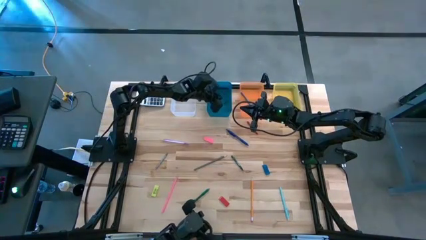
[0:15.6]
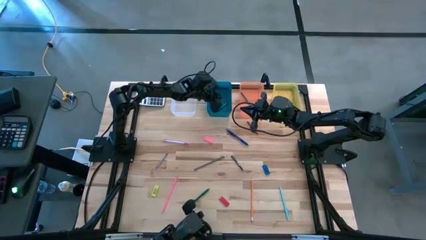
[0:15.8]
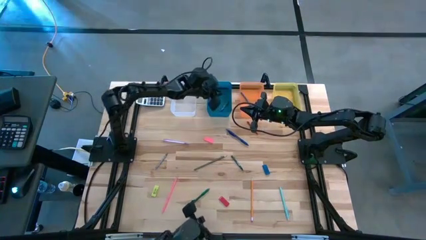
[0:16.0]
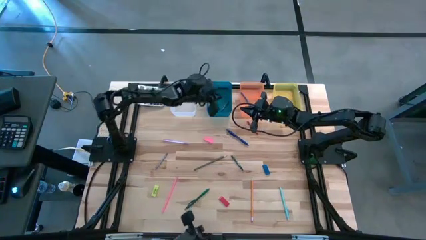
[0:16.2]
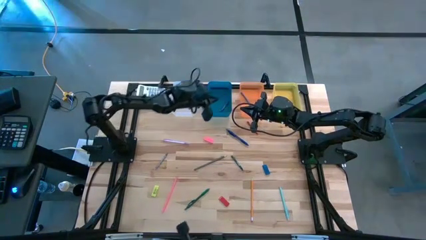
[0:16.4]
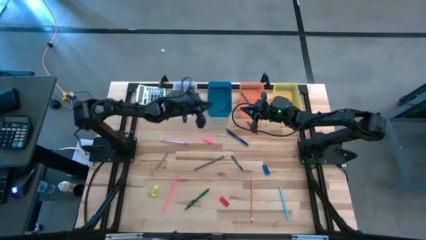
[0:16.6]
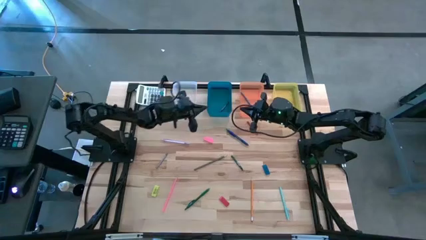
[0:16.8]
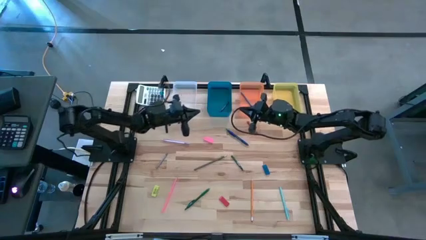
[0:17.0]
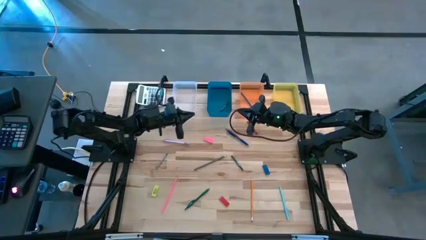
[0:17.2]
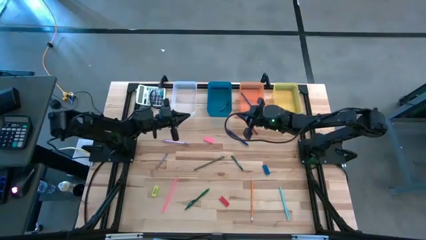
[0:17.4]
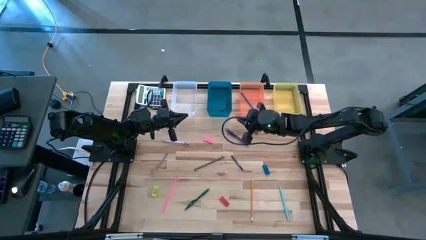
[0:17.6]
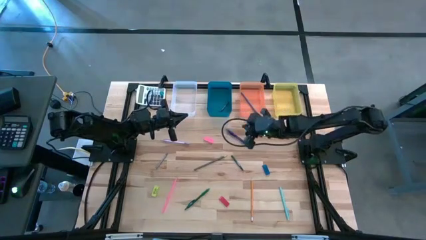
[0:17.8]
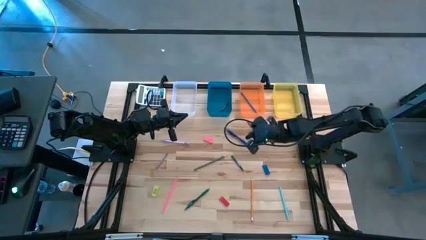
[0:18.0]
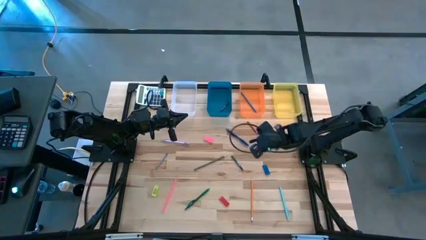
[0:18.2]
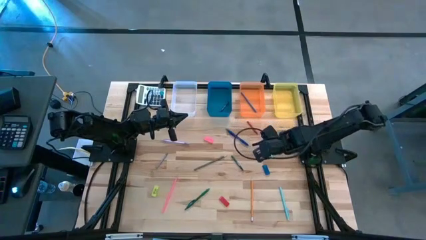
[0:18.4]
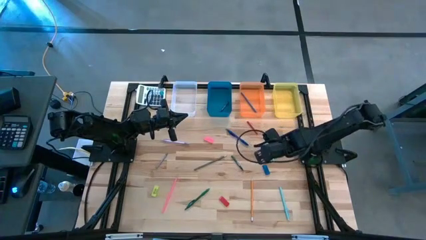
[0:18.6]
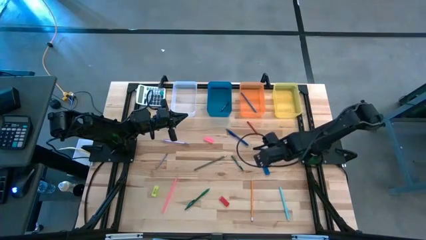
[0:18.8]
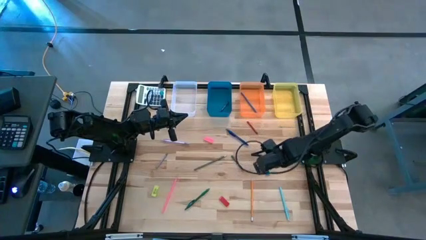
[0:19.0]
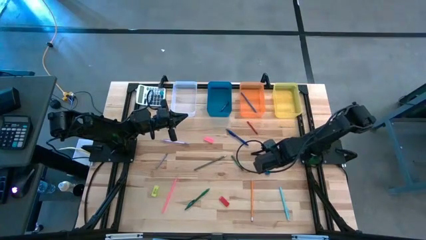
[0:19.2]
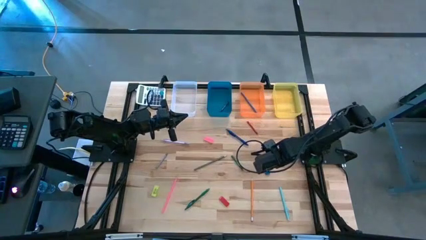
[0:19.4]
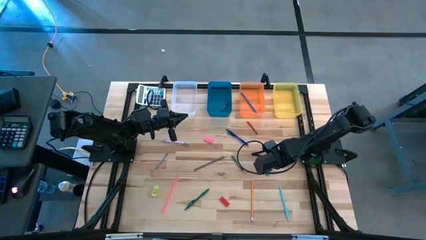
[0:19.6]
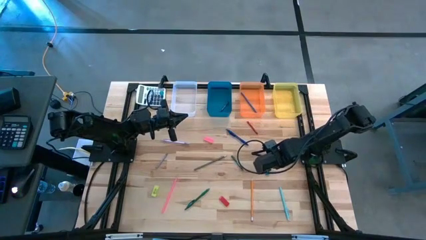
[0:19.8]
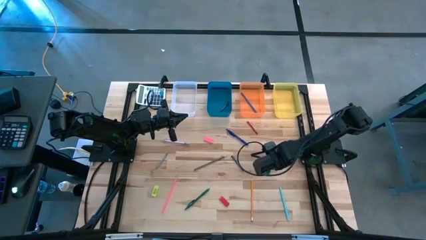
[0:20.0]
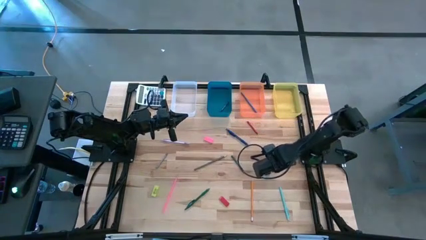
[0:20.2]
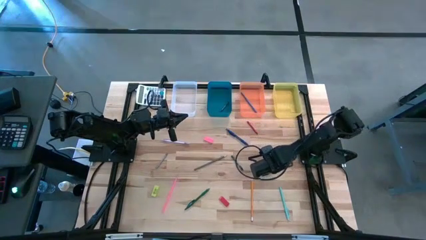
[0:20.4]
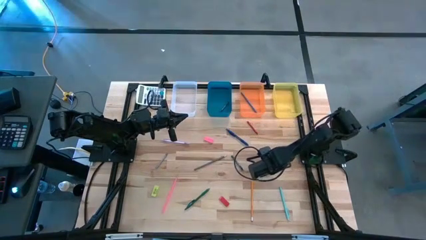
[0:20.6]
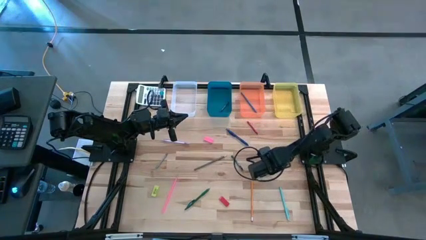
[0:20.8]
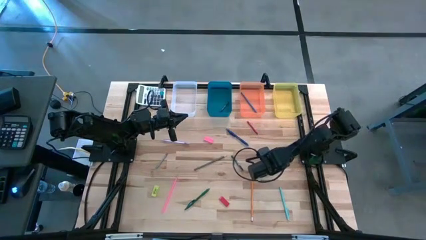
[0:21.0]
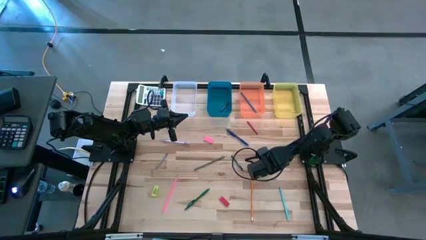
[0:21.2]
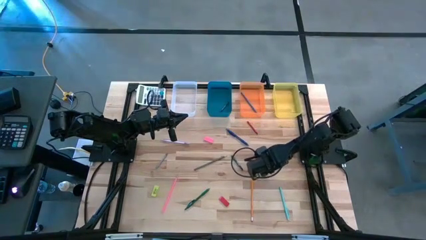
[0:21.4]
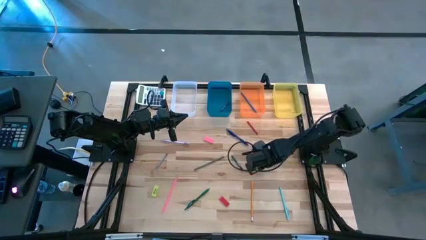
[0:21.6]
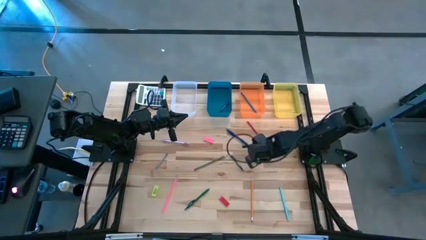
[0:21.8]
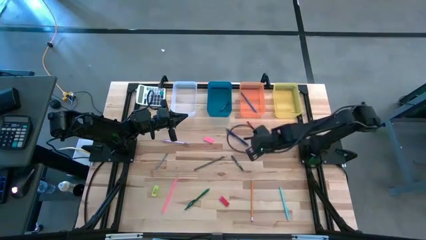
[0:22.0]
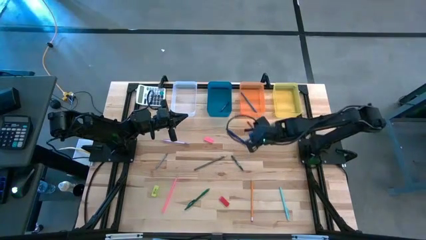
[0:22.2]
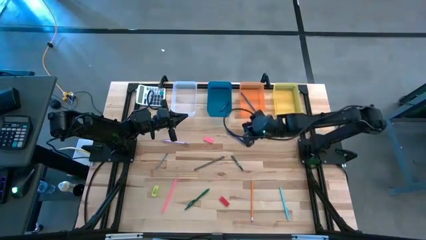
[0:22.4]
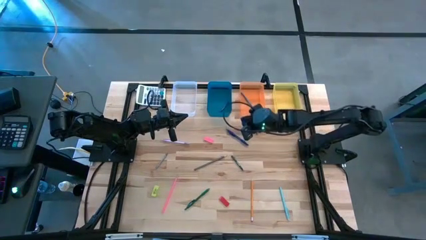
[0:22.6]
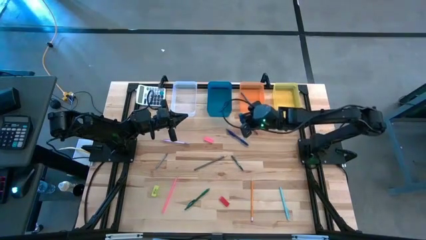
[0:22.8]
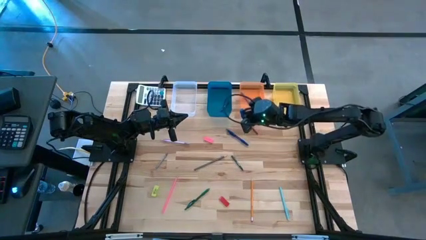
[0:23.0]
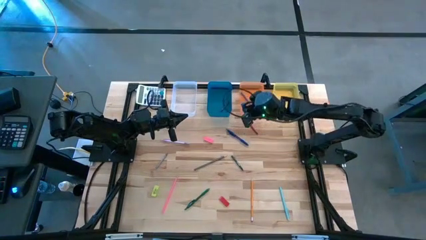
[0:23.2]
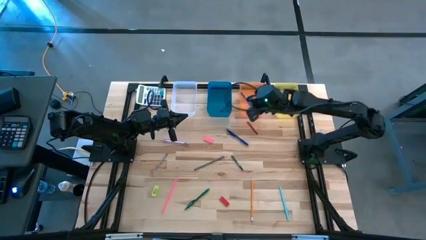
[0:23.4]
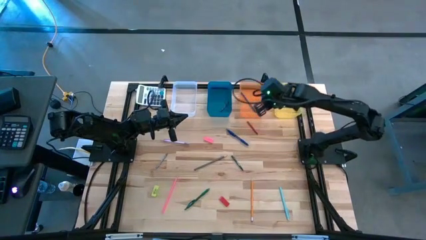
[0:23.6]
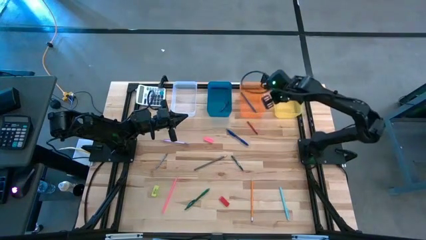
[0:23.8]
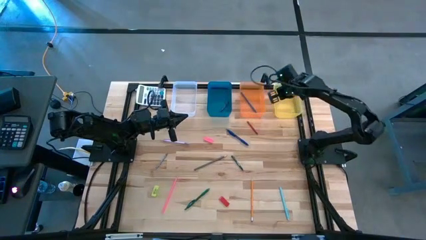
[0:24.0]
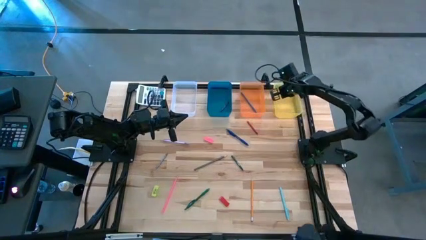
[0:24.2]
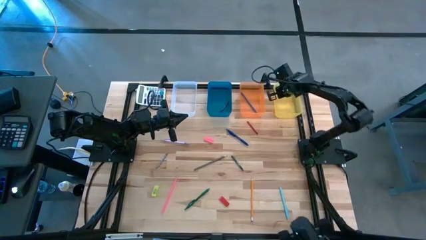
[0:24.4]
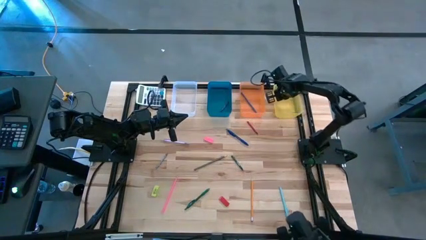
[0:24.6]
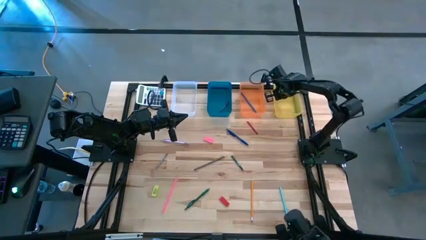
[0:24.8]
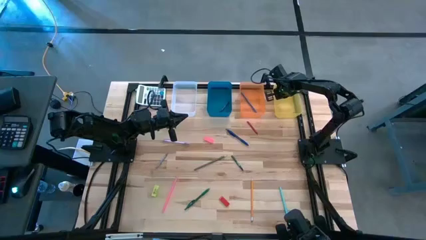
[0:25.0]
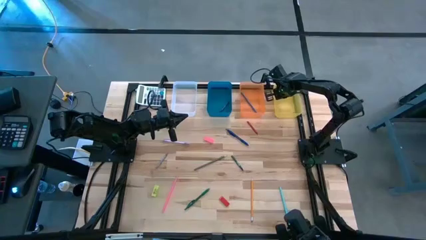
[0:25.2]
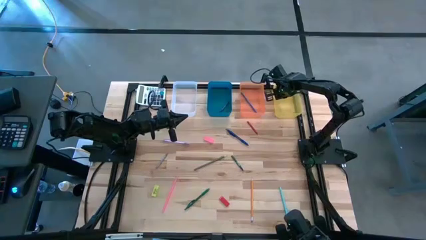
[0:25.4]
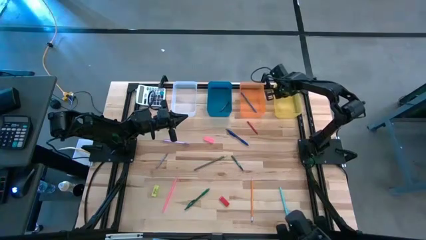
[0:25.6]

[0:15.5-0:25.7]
Task: Sort crayons/erasers/pens/pencils in bins
Put the blue eraser into the yellow bin

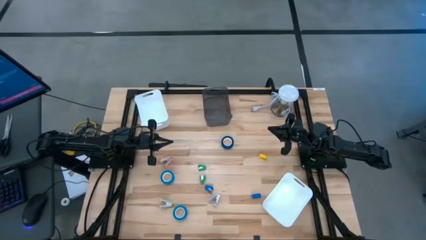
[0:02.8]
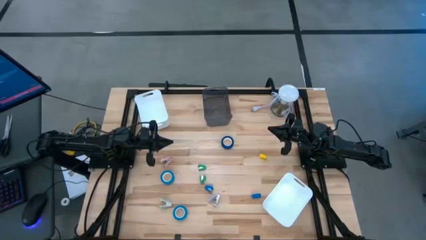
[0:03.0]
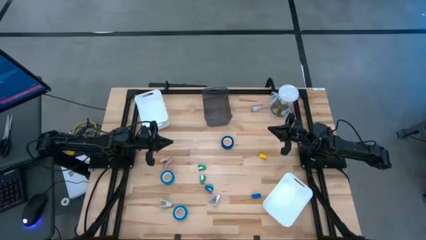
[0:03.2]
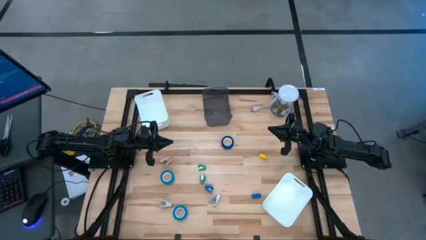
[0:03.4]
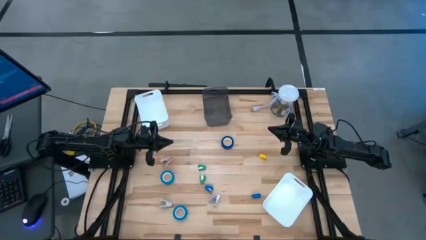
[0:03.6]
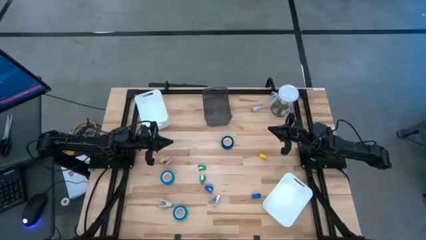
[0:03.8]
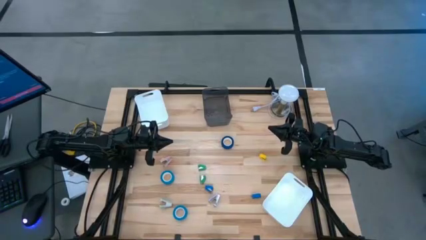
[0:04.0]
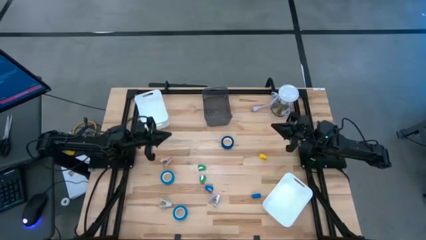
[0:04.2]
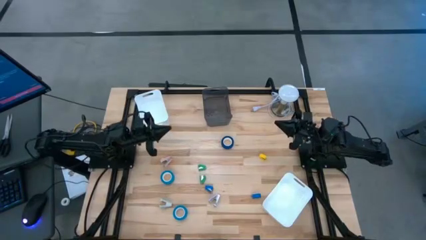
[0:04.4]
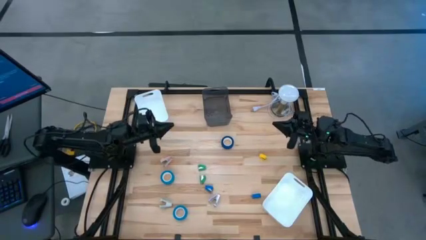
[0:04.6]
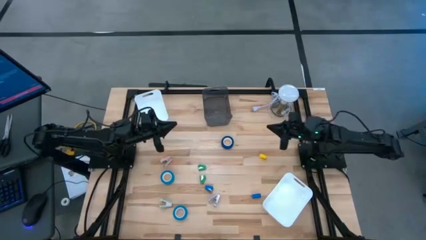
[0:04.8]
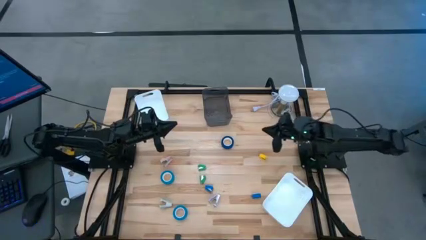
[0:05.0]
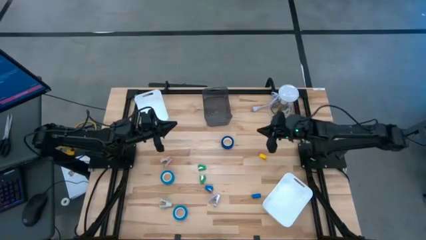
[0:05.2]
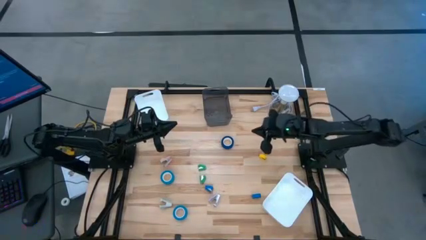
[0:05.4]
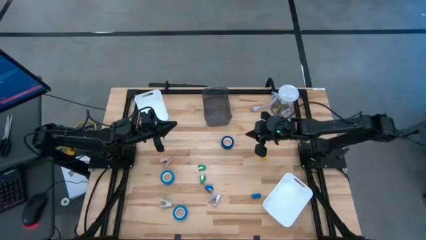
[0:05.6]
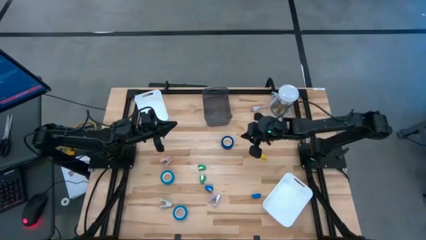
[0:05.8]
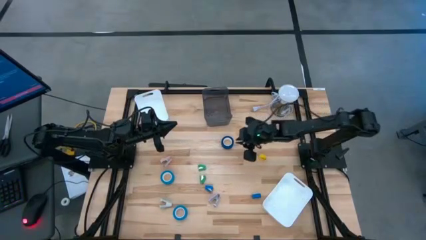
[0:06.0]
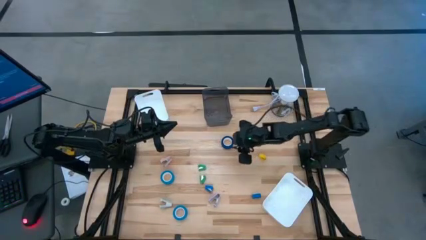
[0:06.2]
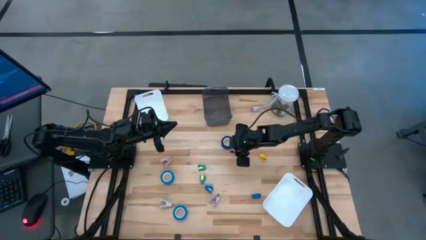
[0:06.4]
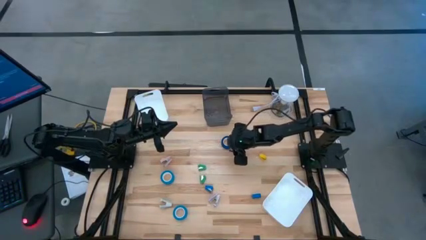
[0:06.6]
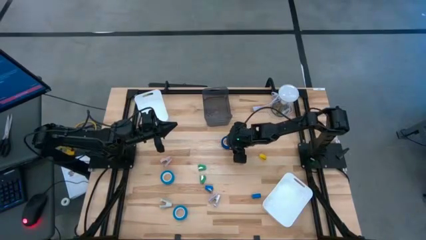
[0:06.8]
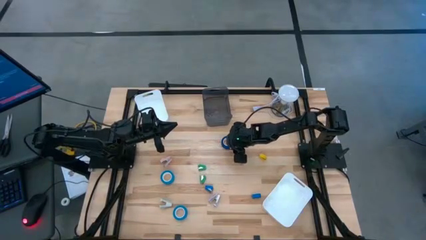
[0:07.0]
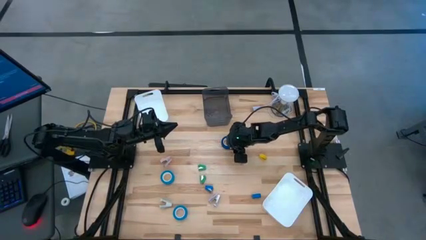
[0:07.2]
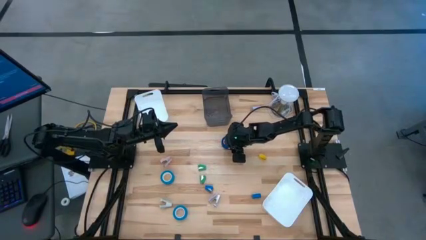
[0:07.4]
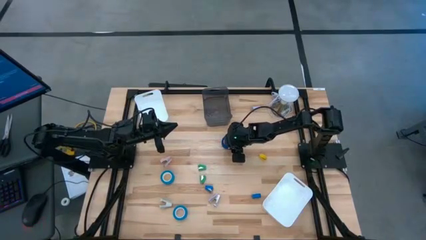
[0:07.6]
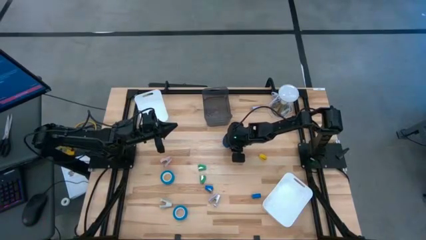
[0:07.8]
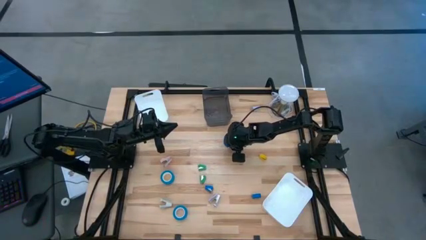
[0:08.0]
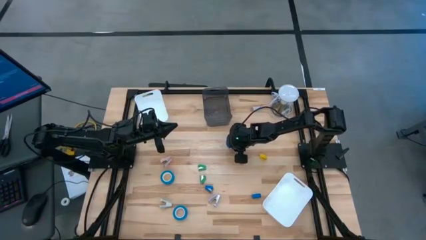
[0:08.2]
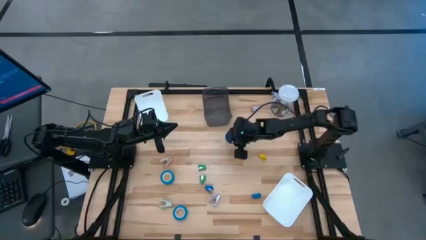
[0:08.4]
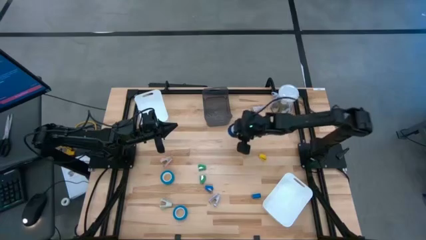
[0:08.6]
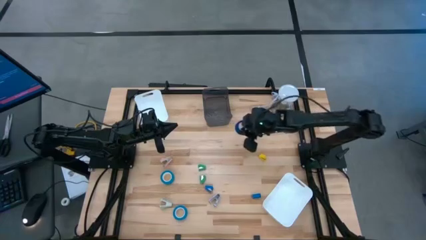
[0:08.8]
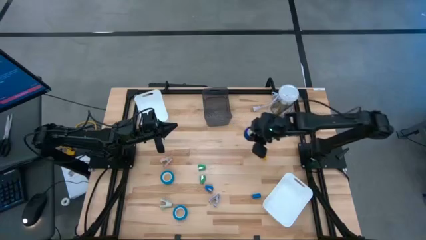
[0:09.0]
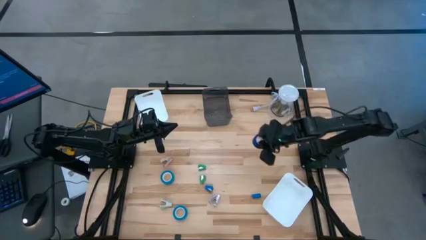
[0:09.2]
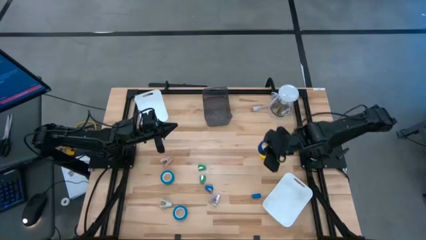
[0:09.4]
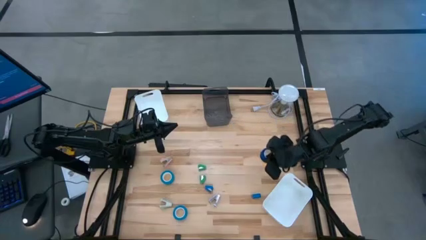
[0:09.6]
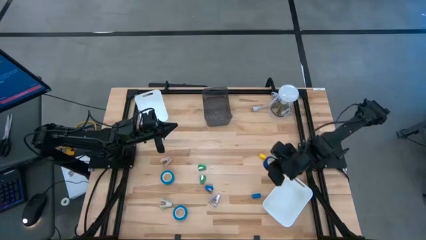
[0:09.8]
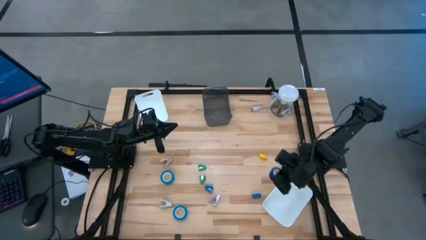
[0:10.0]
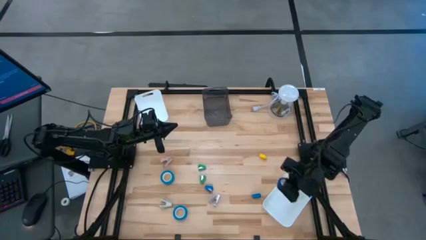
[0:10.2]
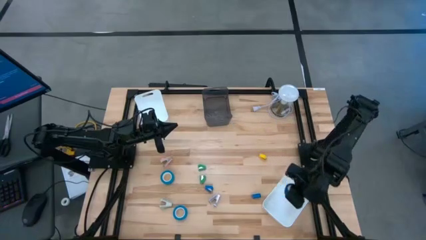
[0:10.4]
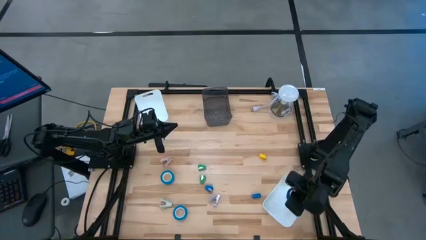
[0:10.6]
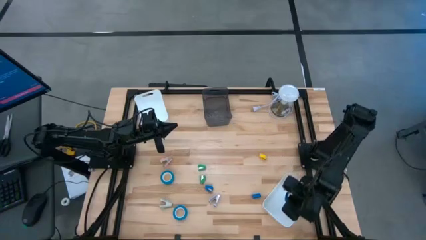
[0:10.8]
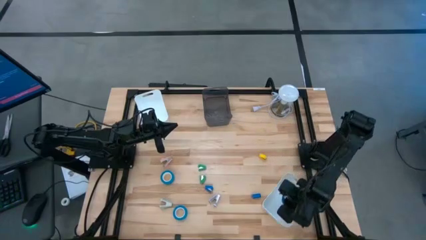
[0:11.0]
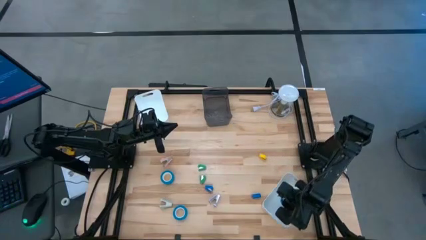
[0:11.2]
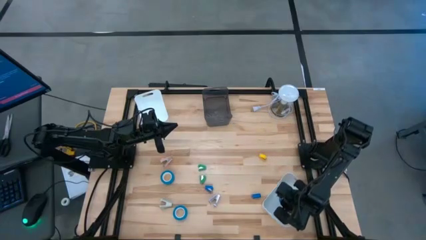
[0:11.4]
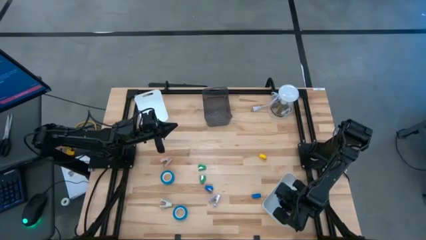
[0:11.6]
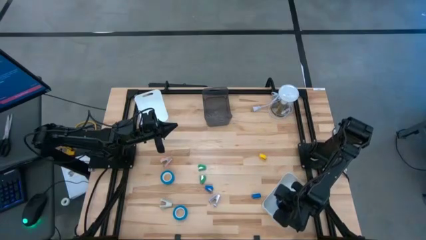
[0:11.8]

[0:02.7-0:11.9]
Task: Pick and place Stapler, Stapler remover, tape
Put the blue tape into the bottom white bin
